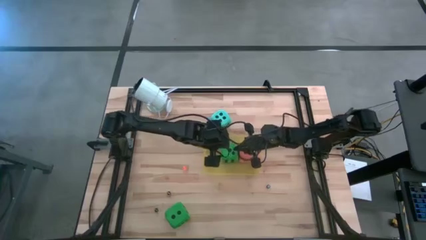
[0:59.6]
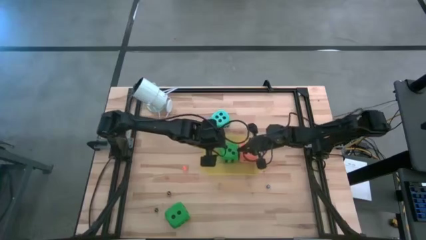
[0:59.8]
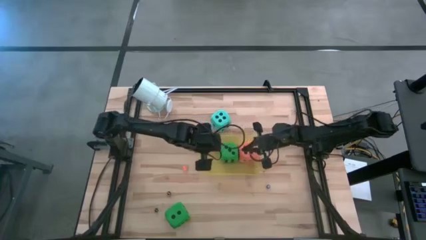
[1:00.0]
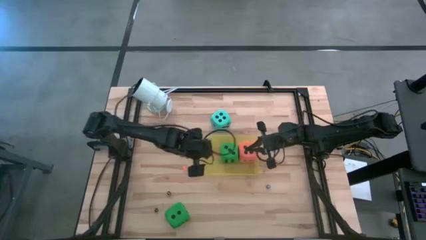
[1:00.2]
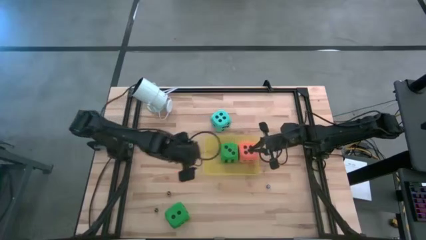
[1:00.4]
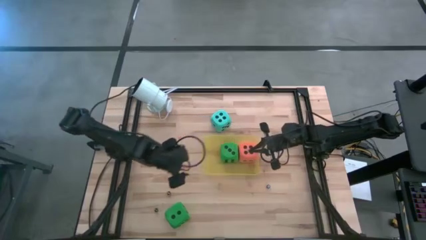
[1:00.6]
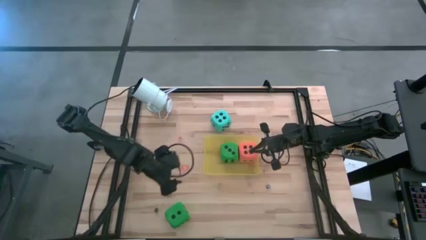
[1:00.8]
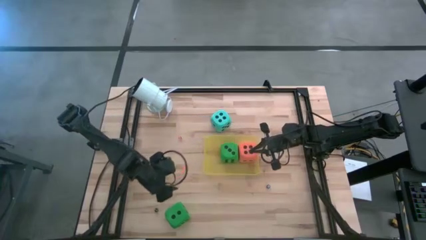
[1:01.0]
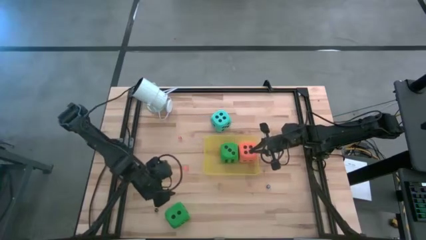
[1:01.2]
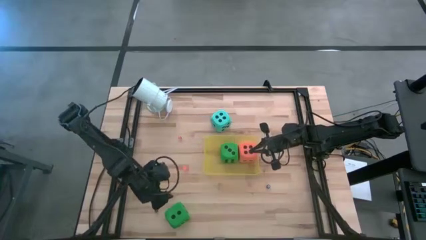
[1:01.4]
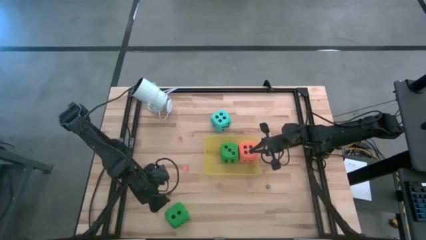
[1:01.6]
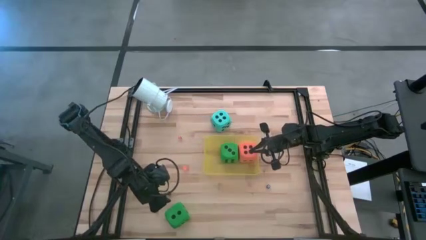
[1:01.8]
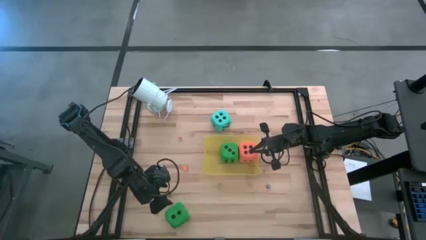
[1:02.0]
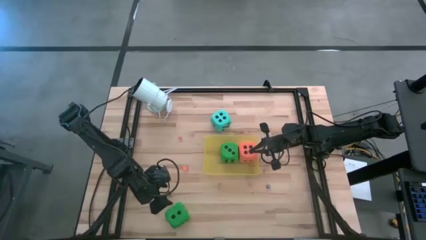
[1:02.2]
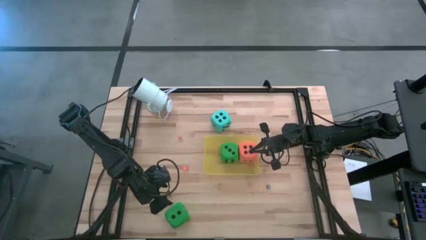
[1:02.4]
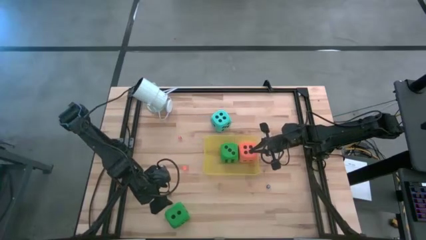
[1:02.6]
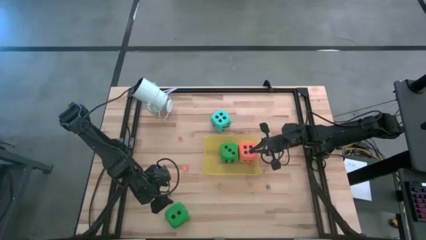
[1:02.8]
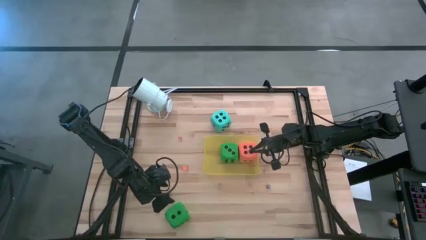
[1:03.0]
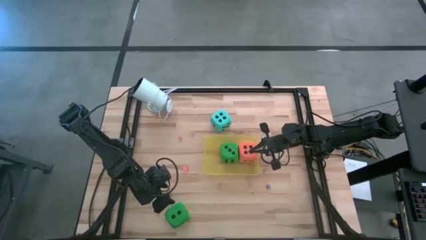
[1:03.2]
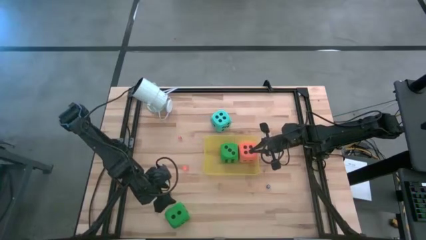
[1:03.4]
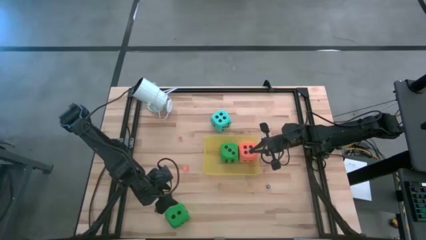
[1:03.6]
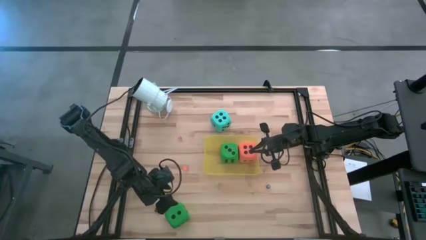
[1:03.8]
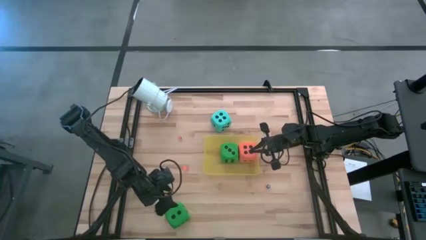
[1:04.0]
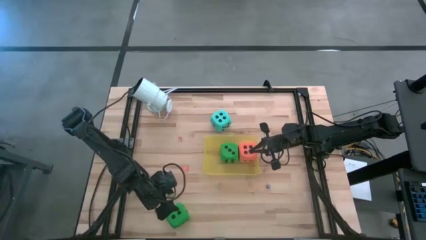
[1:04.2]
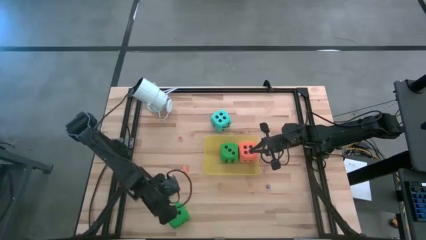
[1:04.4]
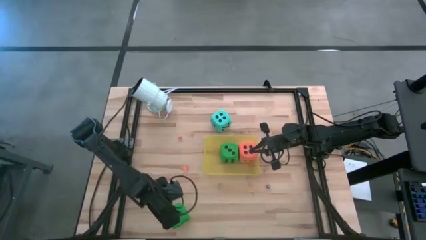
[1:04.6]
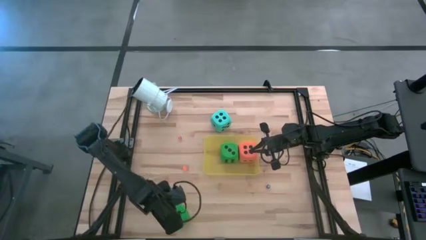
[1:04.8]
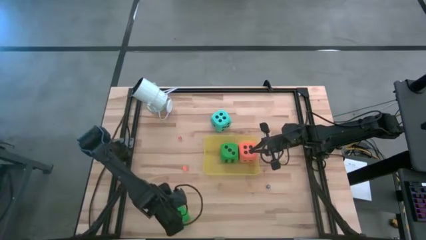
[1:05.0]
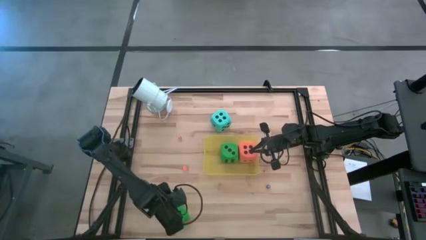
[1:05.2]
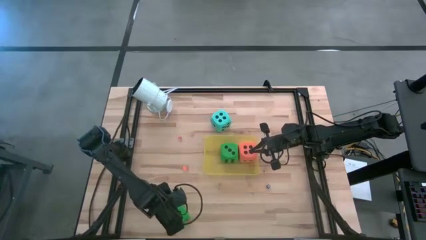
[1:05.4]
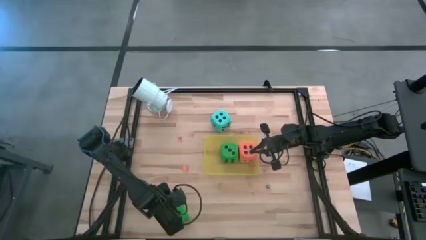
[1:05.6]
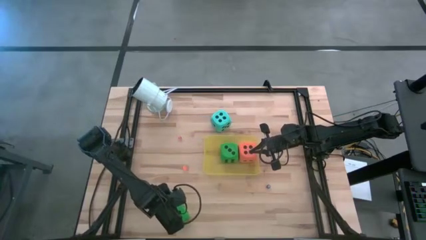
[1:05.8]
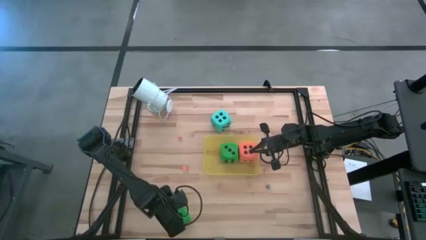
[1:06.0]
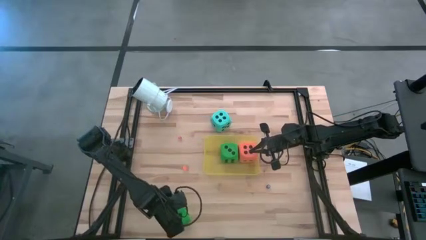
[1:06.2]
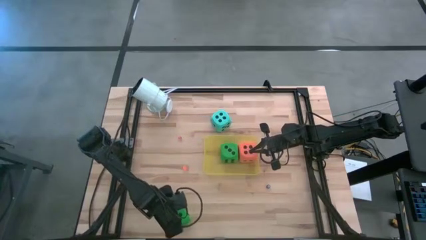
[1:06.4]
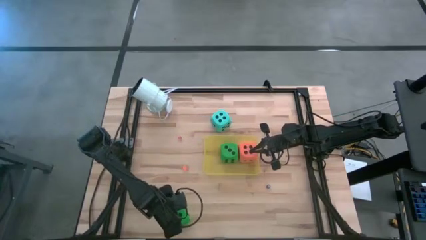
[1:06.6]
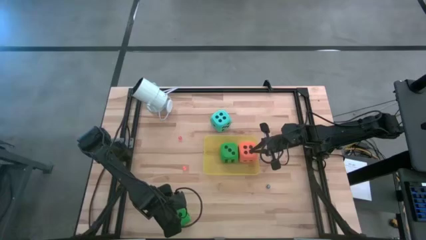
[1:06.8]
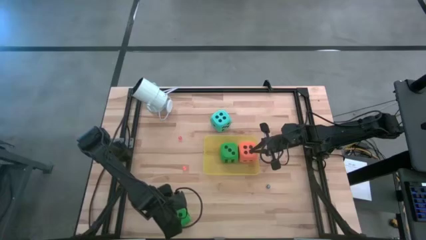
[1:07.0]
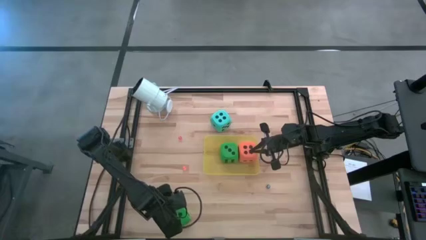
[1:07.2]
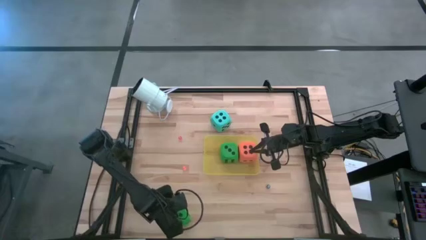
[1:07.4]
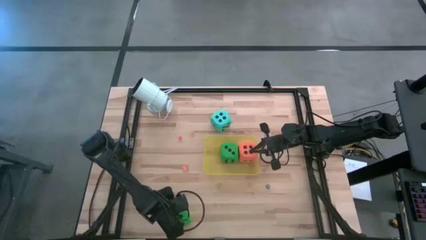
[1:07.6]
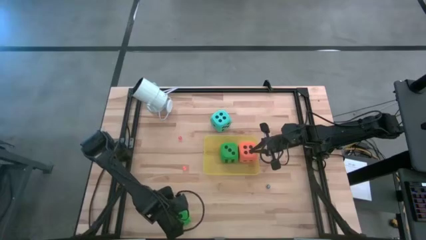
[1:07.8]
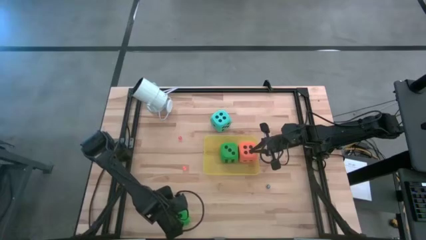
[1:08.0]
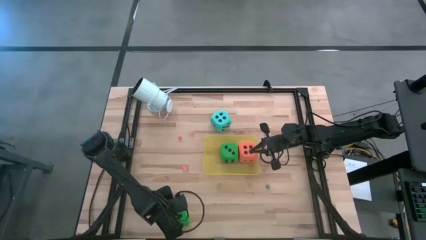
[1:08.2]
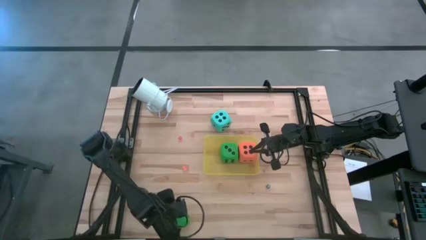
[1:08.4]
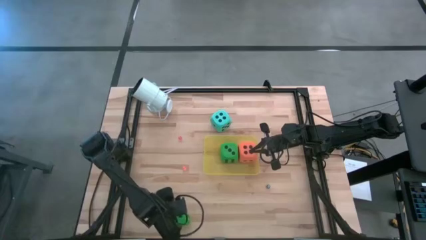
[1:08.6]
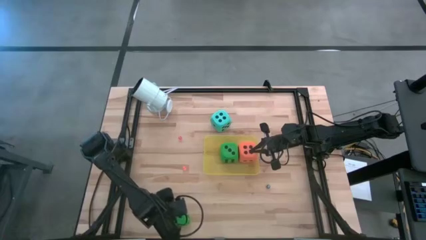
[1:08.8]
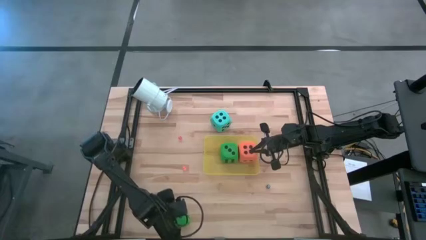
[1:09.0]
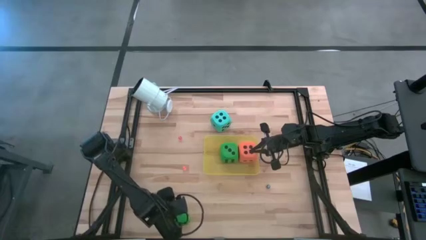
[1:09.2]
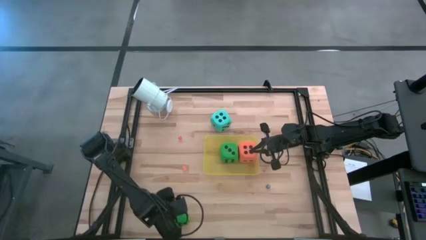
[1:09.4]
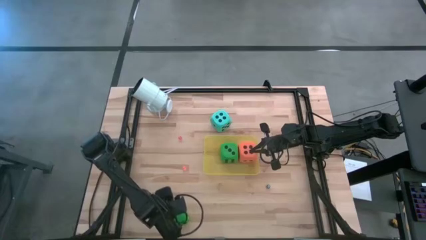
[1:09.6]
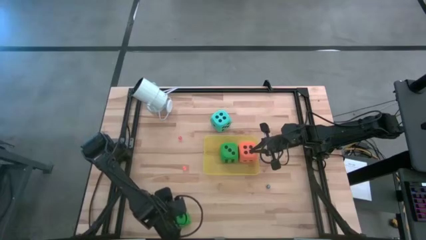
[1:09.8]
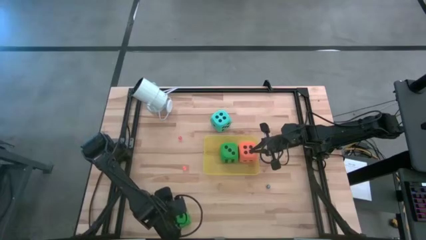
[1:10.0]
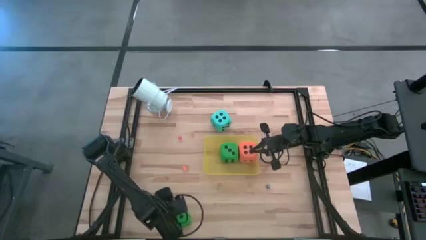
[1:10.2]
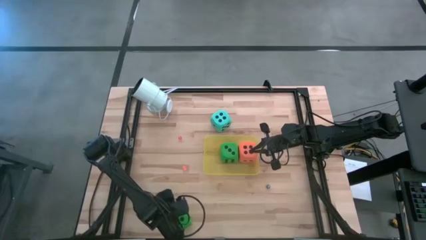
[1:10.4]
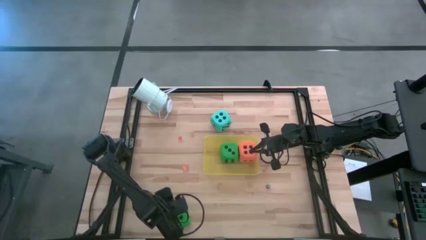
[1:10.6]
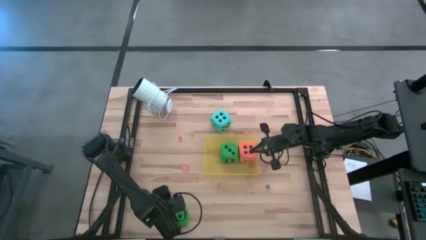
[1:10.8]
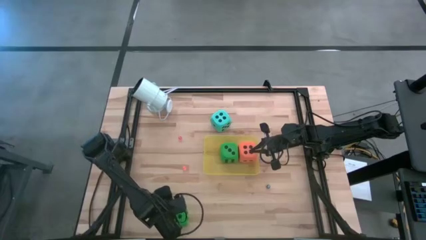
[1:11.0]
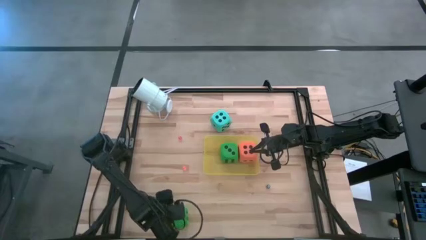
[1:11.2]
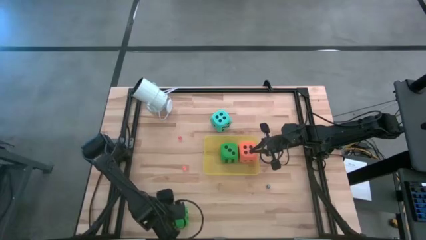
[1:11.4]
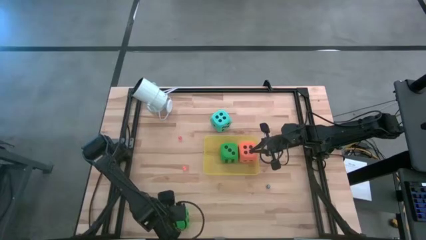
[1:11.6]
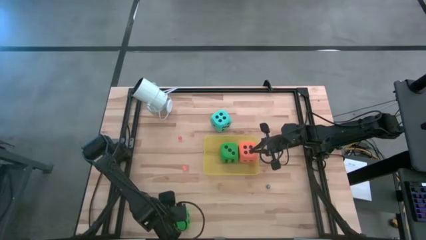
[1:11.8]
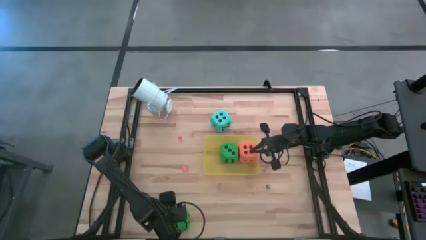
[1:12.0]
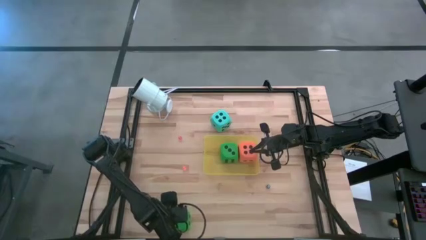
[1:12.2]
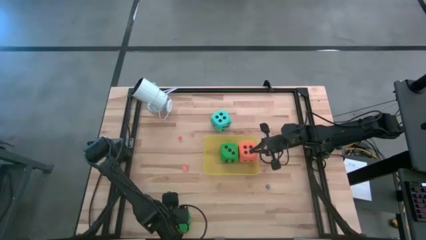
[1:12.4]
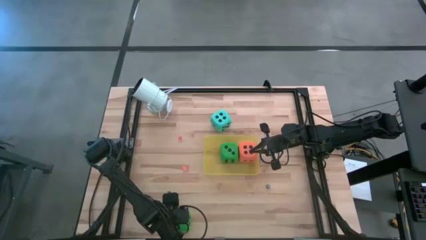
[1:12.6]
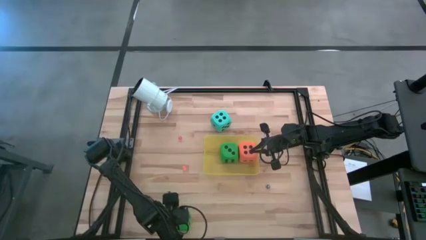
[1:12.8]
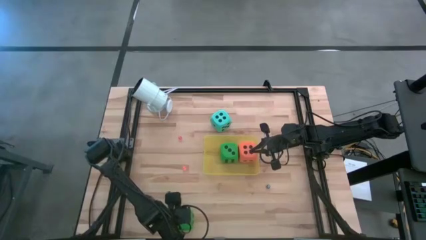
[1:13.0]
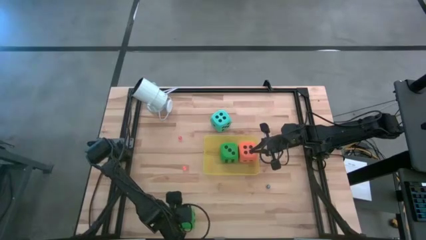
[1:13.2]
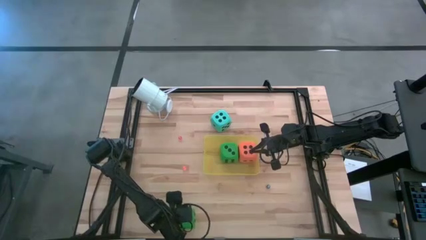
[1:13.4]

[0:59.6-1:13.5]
Task: Pick & Place Dice
Put the big green dice into the yellow bin

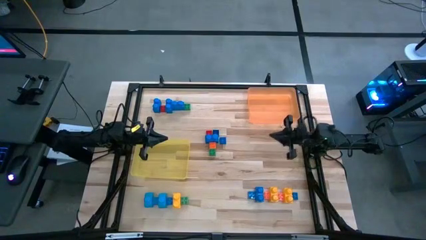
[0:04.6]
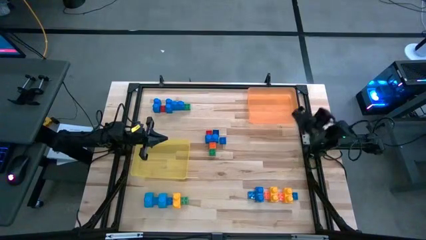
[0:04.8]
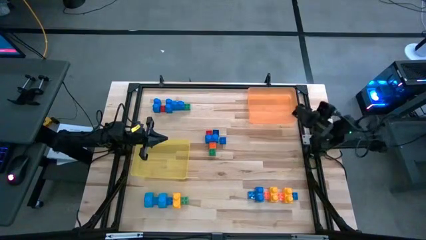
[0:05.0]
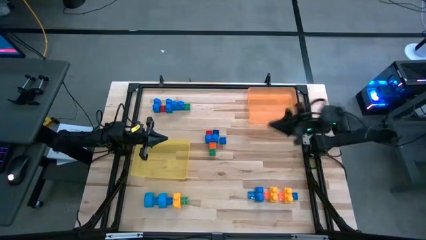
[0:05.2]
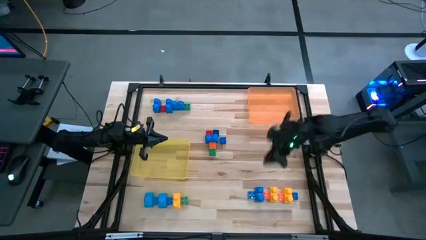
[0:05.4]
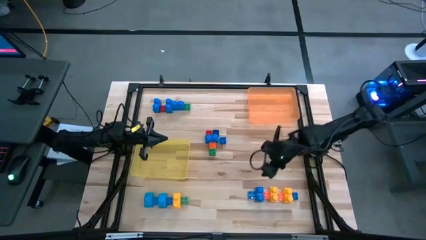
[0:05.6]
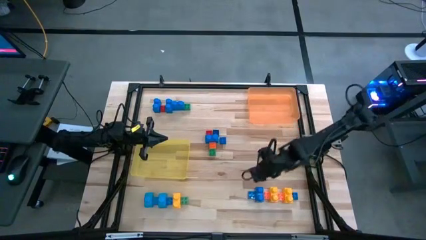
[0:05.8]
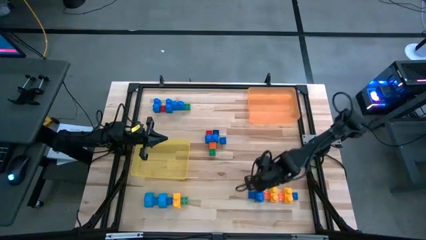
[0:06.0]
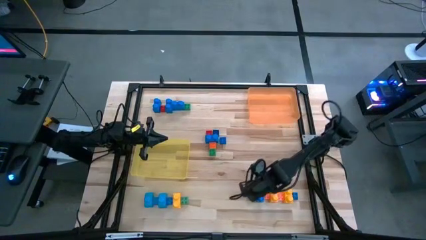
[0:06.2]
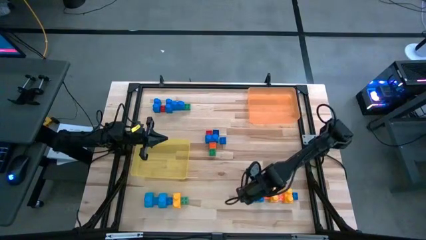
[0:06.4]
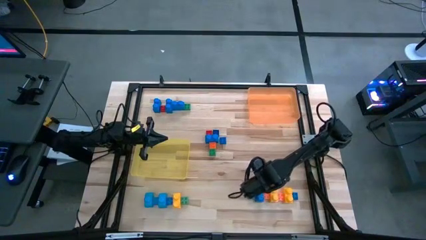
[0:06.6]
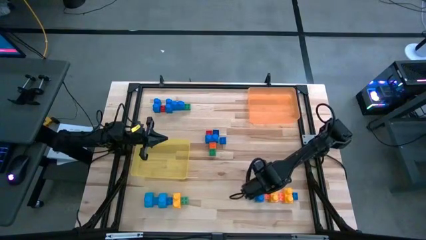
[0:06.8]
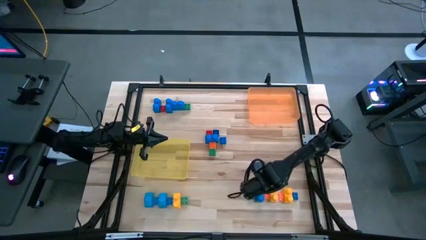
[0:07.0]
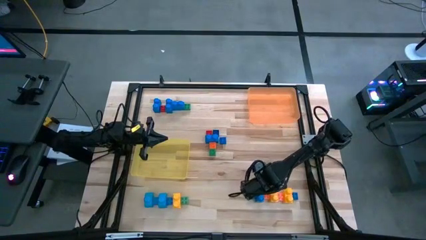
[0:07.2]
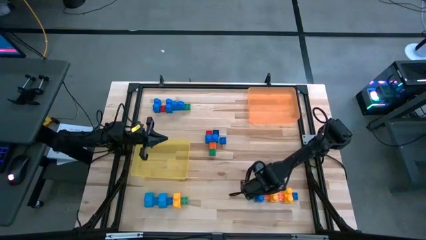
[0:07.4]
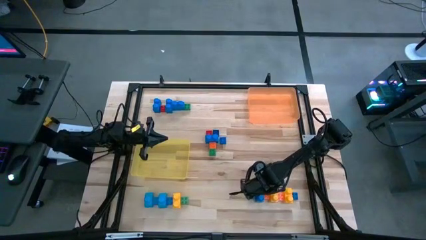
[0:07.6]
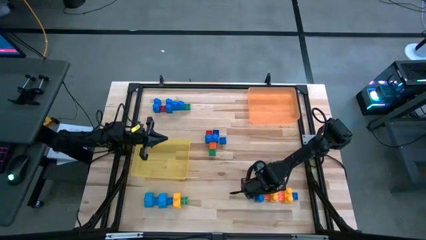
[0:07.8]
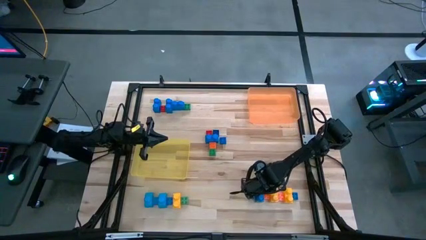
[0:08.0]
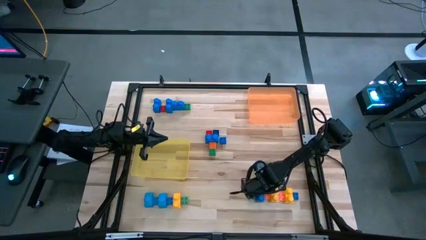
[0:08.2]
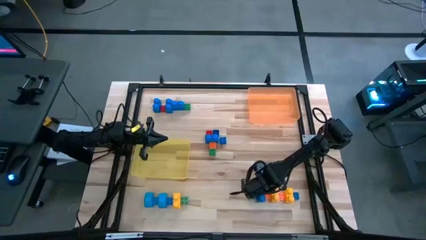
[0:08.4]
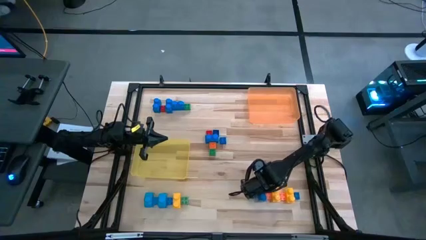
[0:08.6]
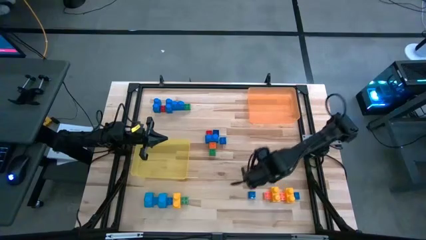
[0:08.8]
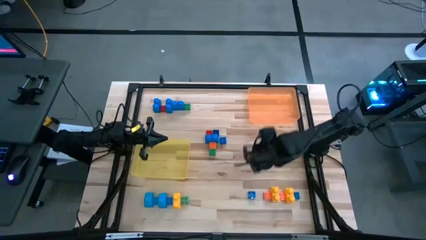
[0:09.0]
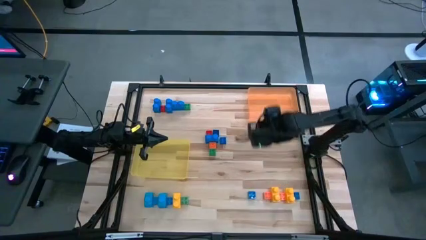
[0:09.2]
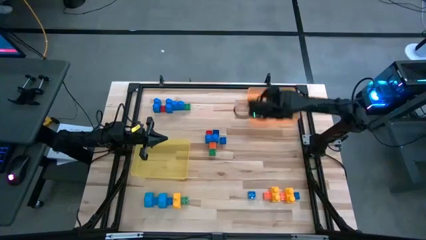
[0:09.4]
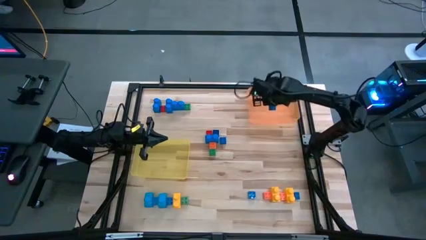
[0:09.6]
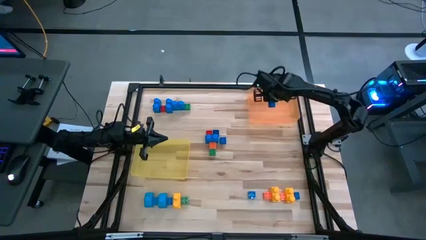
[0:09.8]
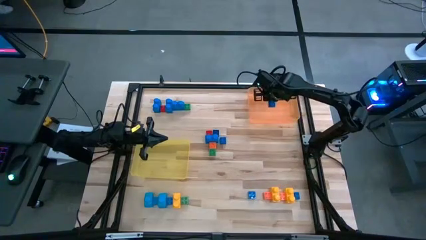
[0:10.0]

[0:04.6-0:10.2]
Task: Sort blocks by size
Put the large blue 2 stud game piece into the orange bin
